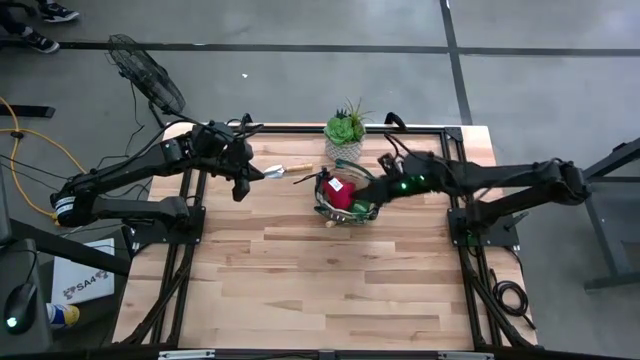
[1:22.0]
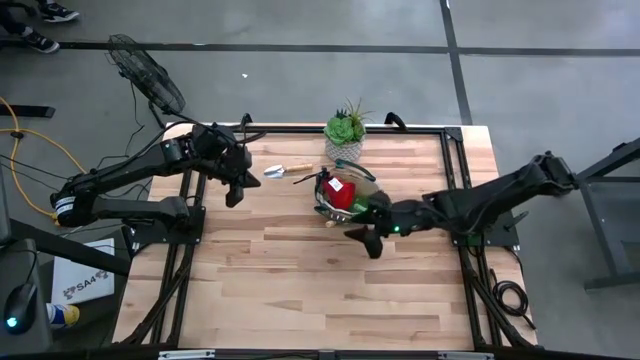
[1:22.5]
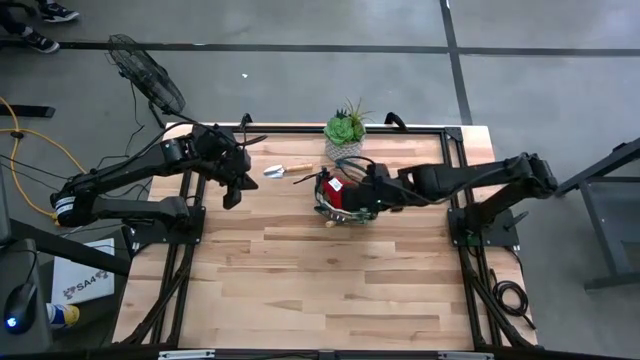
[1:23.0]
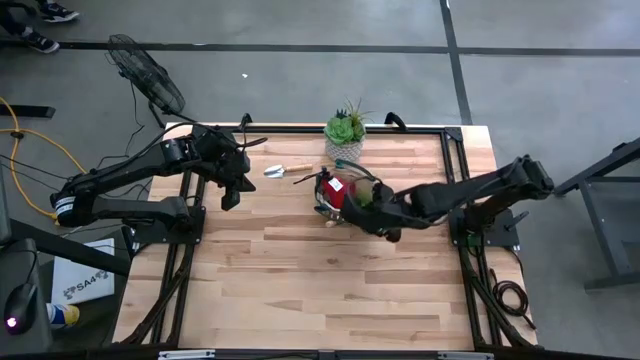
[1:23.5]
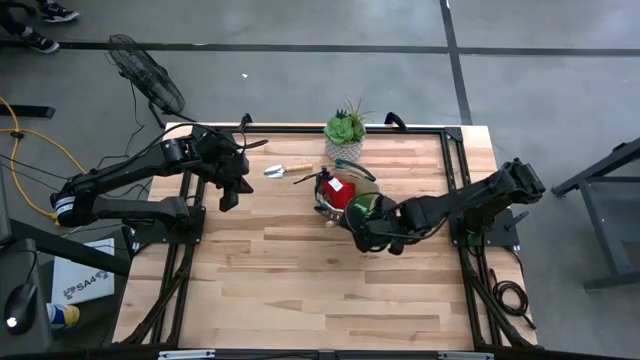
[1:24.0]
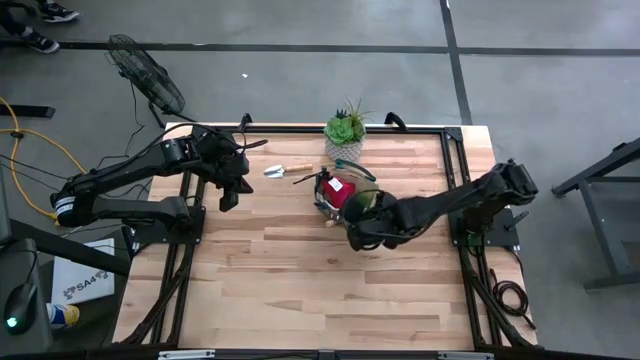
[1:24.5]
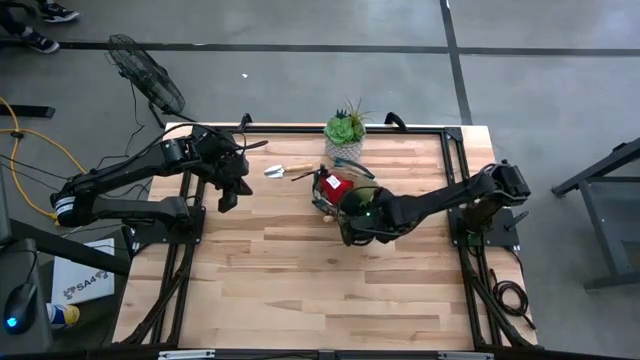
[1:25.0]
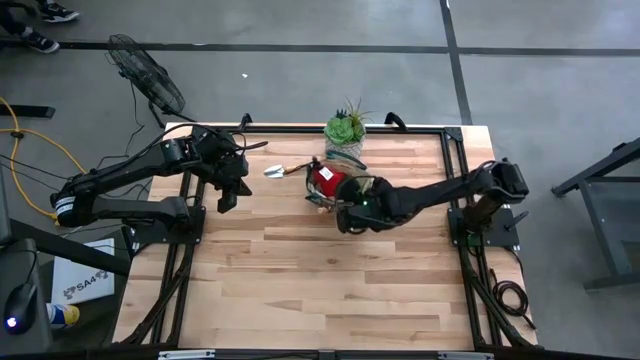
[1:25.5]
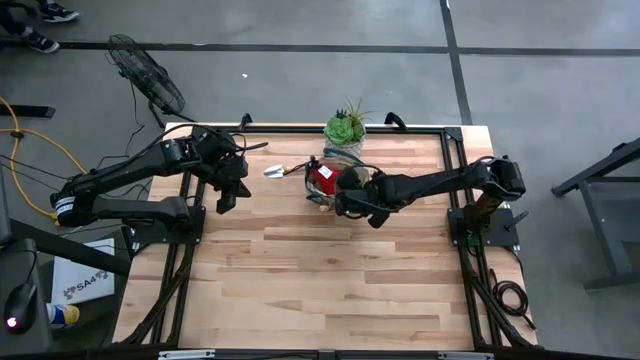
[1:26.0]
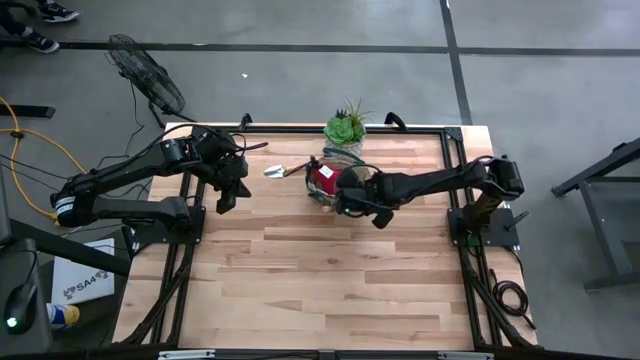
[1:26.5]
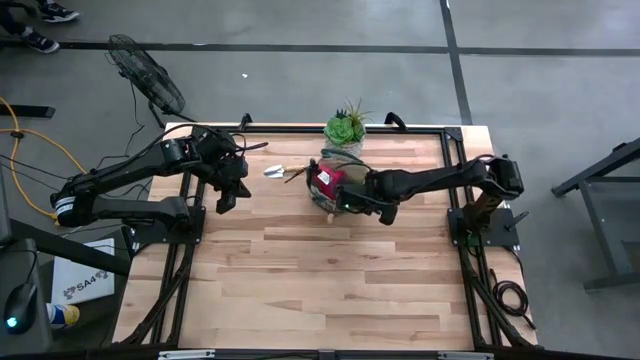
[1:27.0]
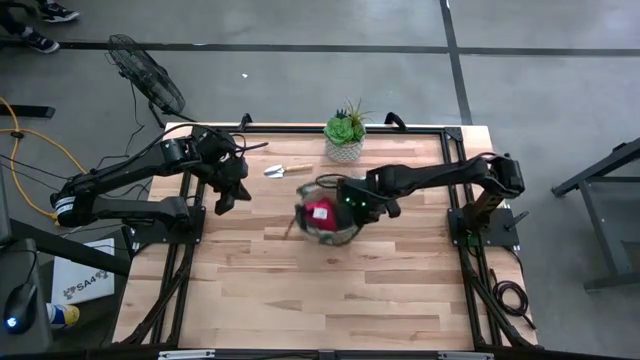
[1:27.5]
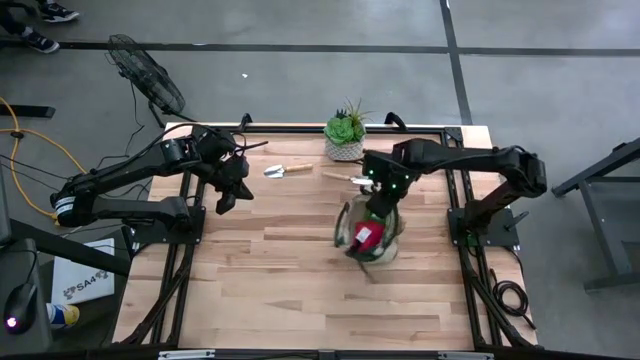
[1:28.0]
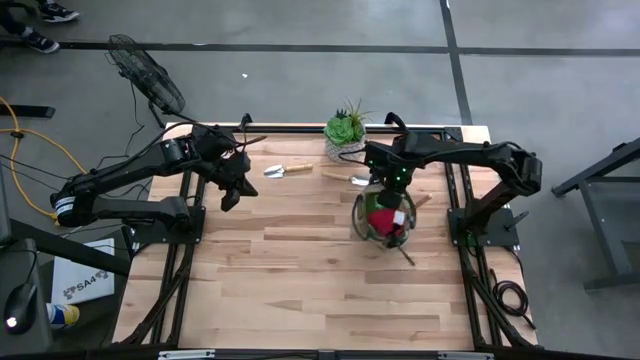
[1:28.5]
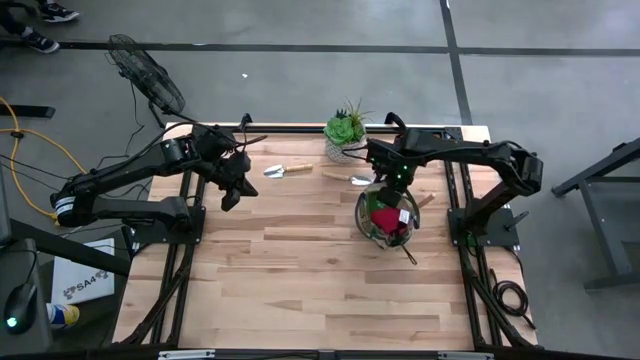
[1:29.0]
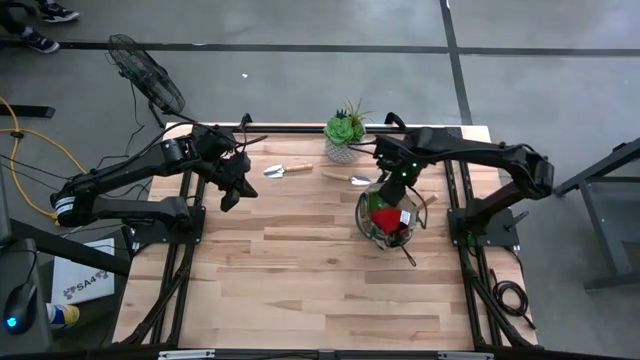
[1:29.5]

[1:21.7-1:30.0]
Task: Pick & Place Garden tools in Gardening bag
Adjust the brown gardening bag

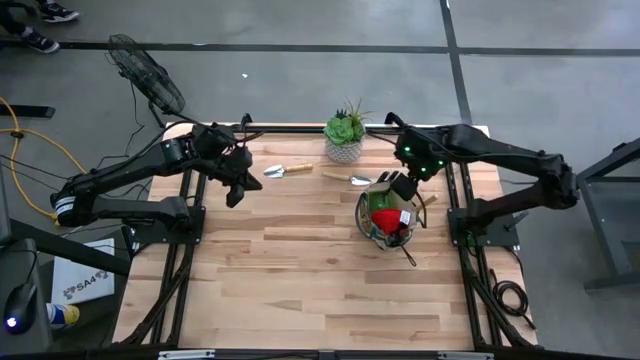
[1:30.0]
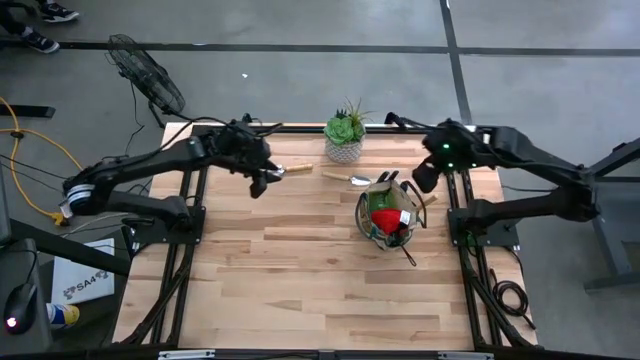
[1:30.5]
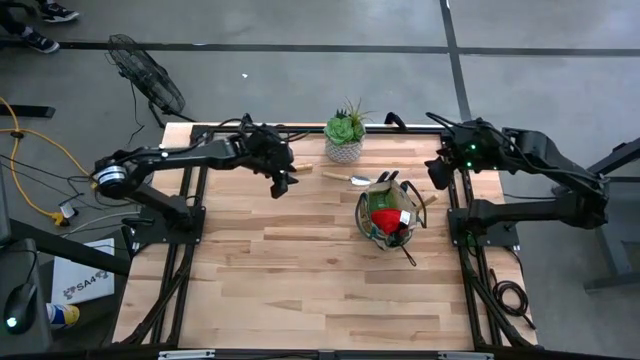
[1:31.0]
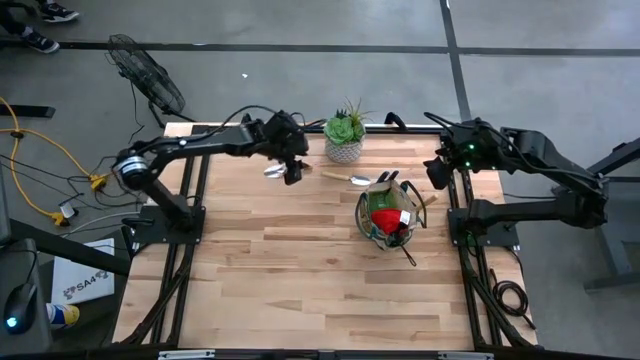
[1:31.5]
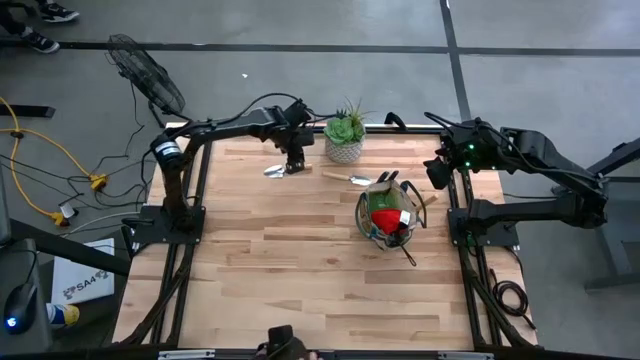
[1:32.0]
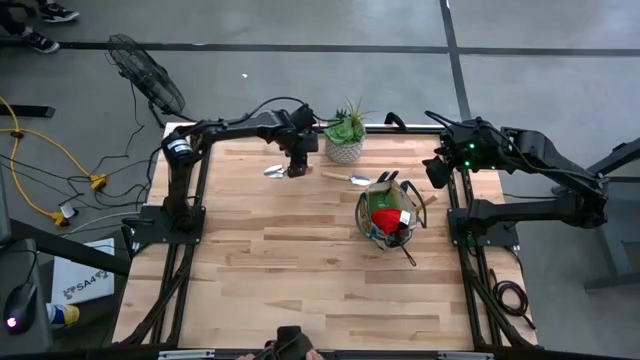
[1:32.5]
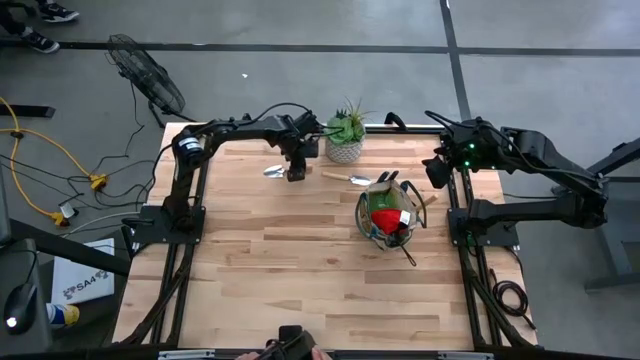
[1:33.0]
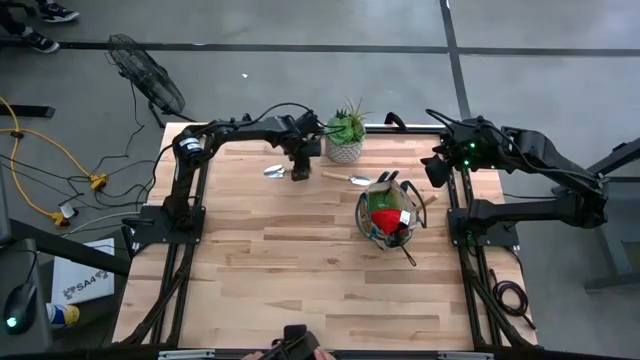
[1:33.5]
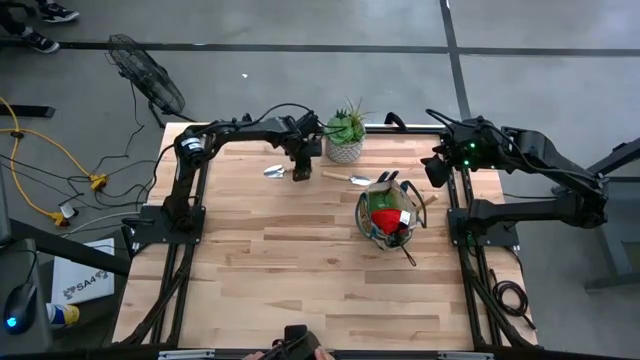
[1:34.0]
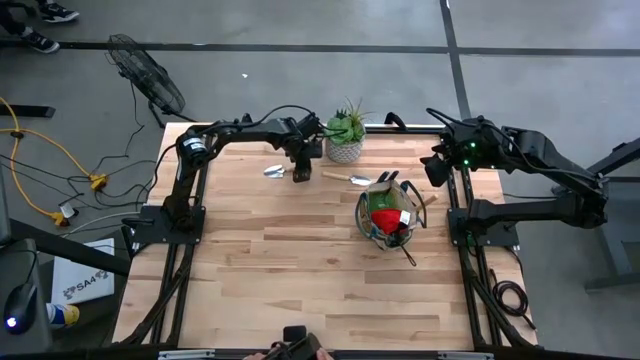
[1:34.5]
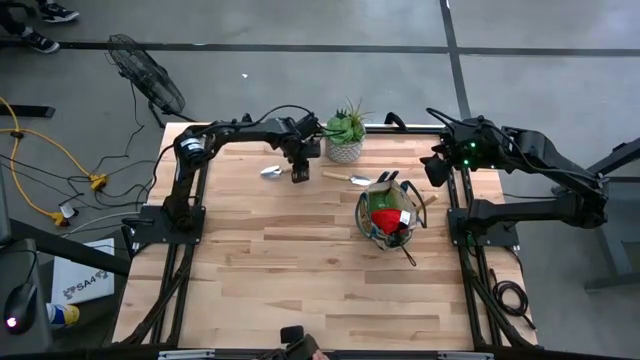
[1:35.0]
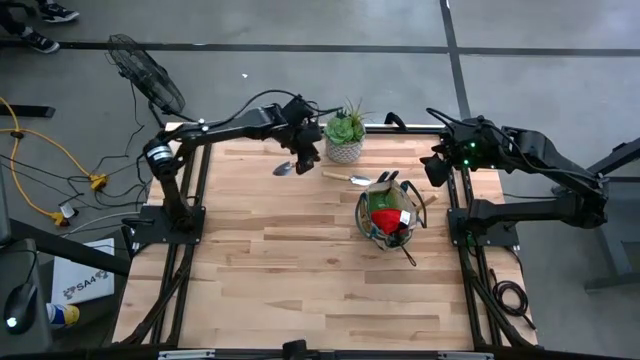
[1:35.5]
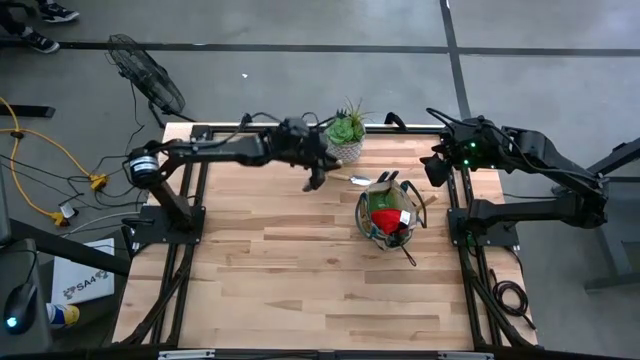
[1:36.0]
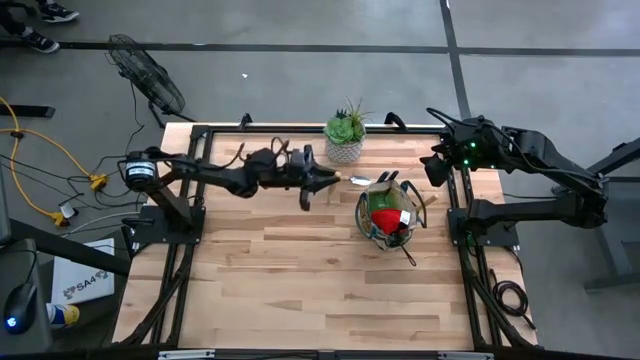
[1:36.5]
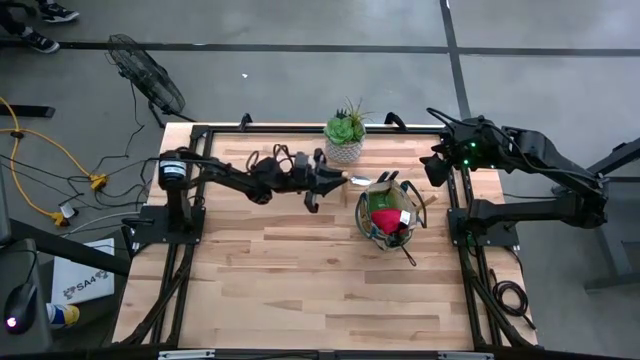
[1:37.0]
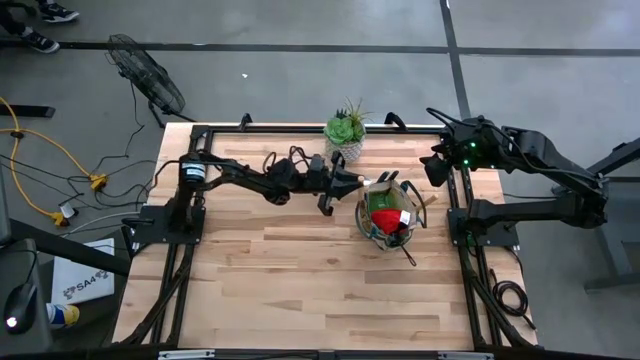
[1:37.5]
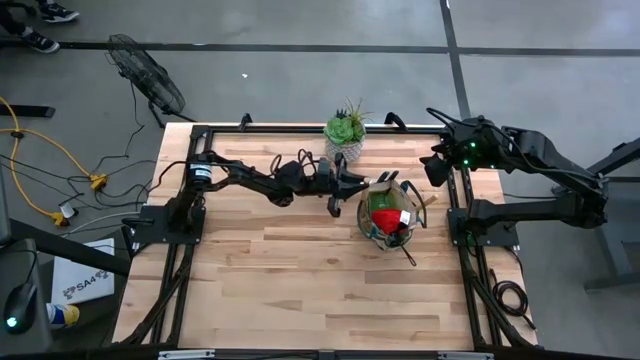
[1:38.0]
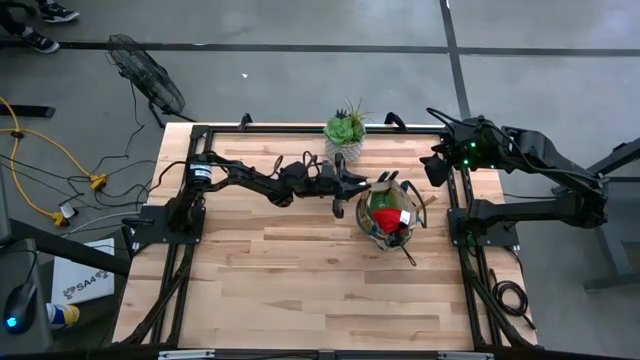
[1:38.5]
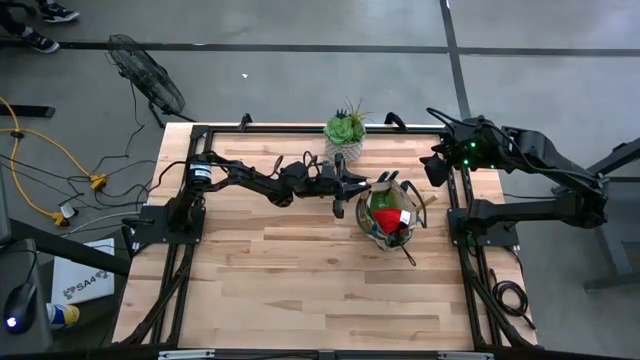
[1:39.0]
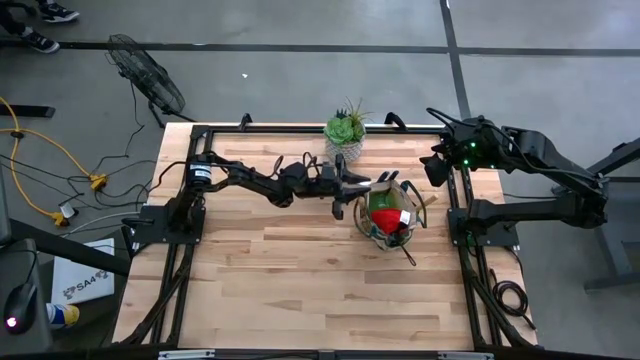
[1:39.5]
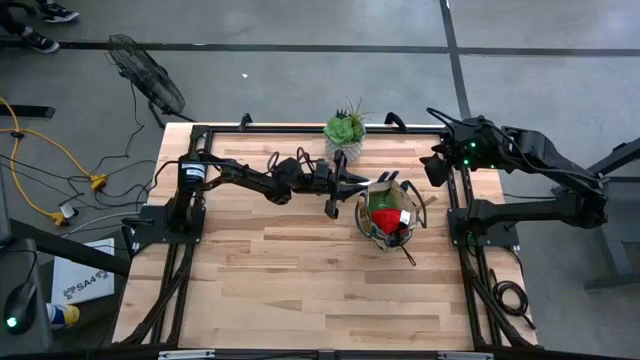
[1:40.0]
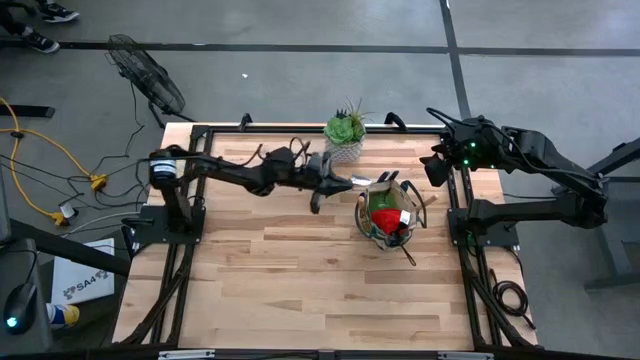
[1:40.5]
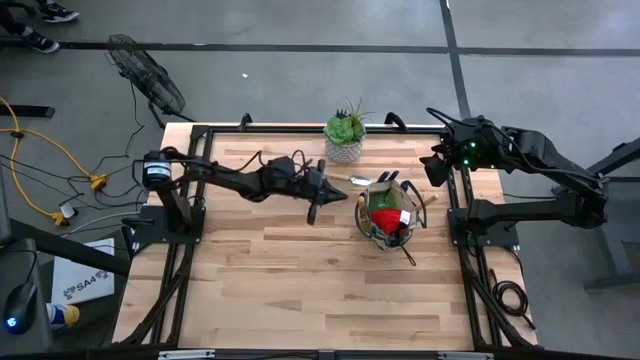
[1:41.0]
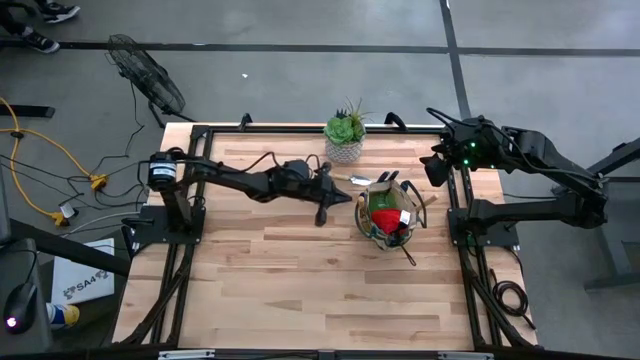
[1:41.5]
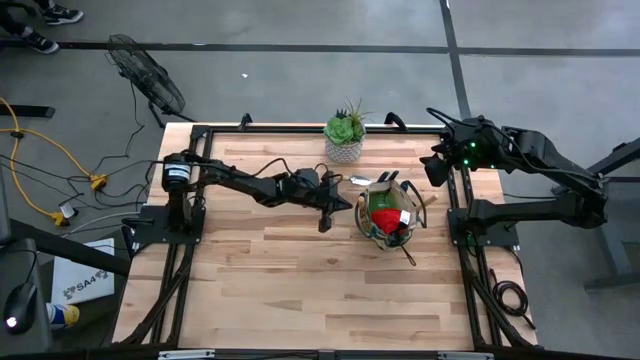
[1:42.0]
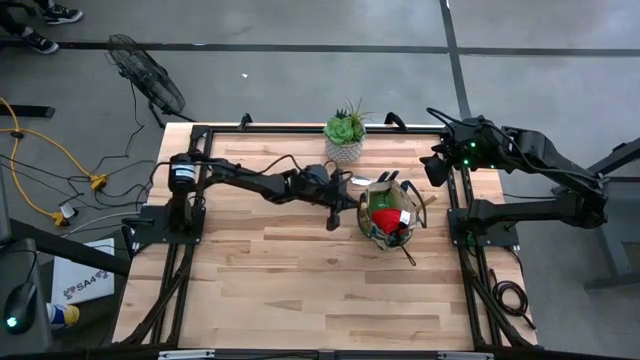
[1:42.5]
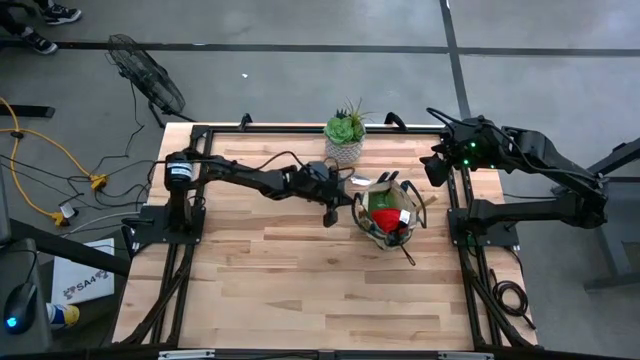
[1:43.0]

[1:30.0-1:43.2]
Put the left brown trowel into the brown gardening bag
